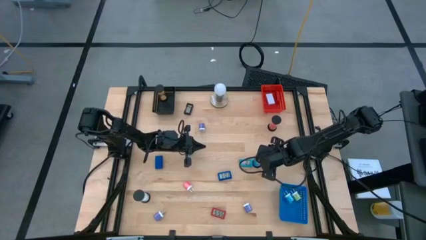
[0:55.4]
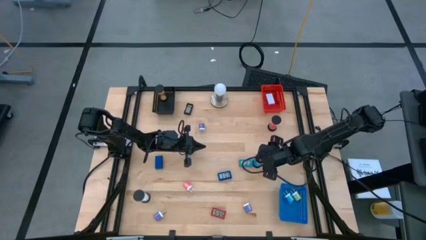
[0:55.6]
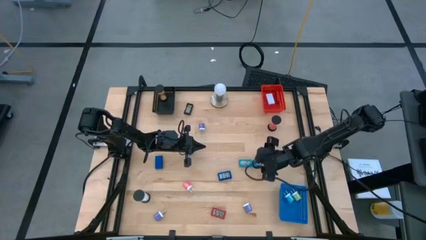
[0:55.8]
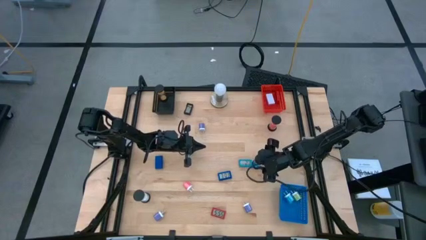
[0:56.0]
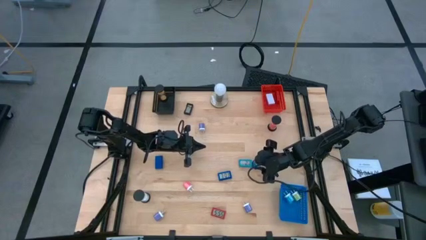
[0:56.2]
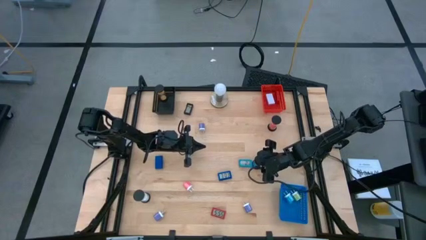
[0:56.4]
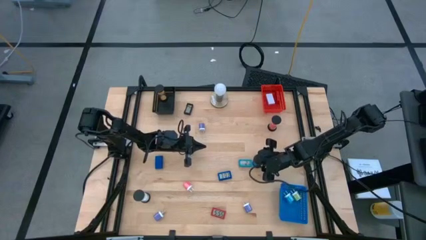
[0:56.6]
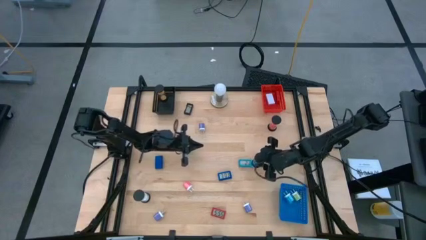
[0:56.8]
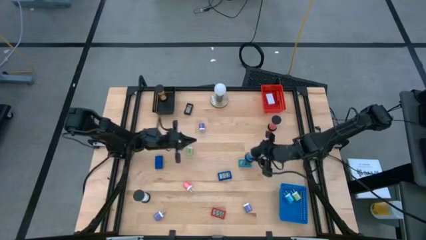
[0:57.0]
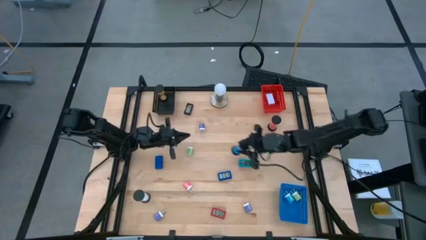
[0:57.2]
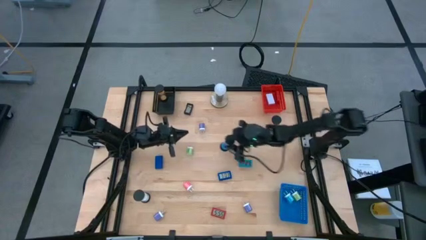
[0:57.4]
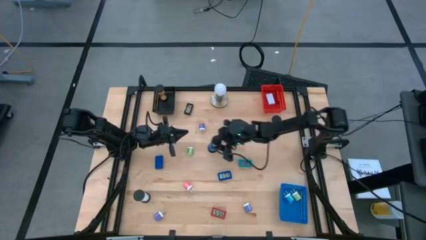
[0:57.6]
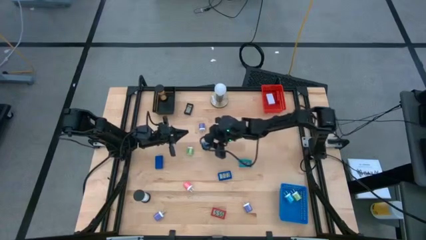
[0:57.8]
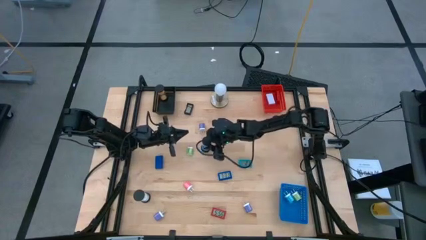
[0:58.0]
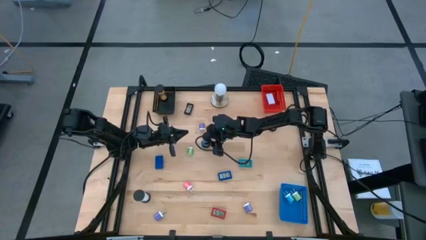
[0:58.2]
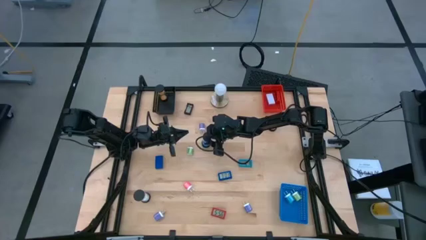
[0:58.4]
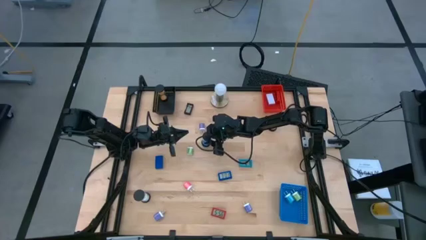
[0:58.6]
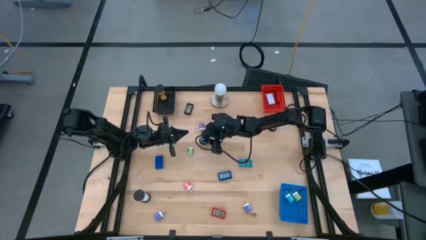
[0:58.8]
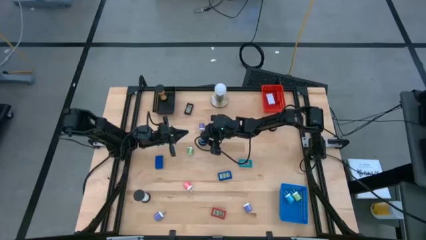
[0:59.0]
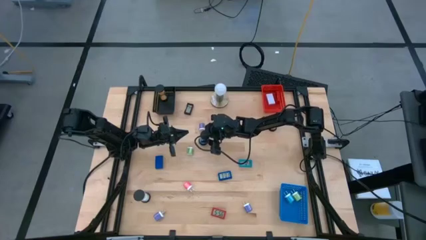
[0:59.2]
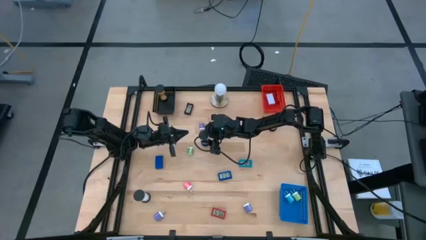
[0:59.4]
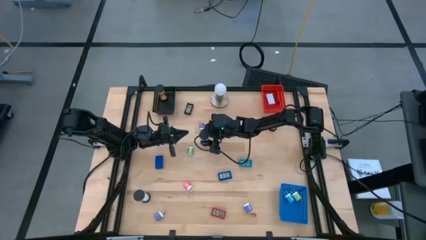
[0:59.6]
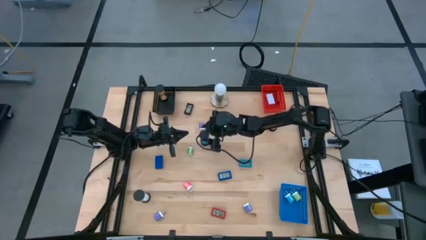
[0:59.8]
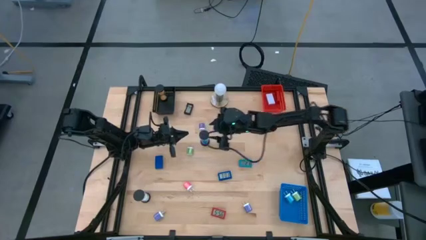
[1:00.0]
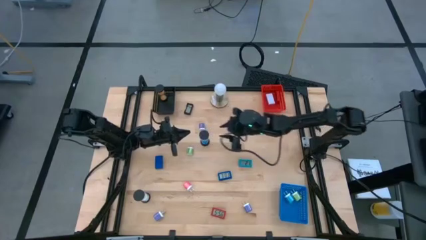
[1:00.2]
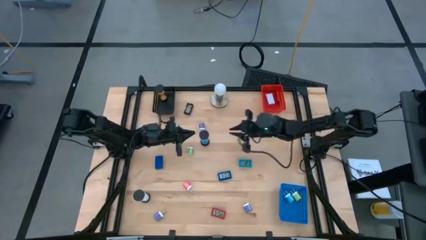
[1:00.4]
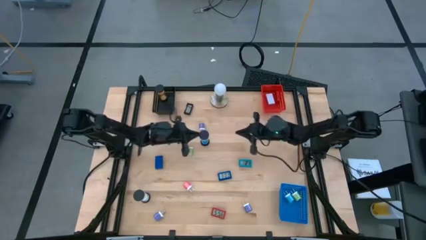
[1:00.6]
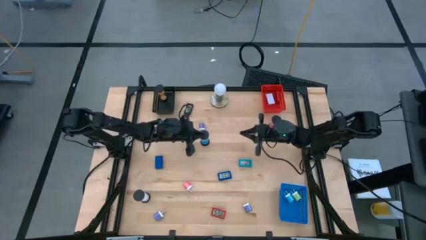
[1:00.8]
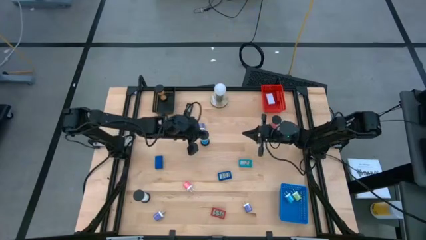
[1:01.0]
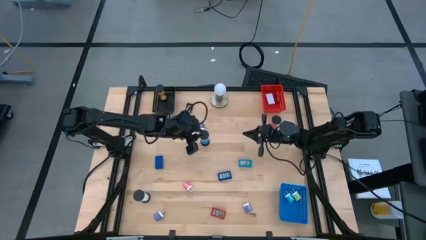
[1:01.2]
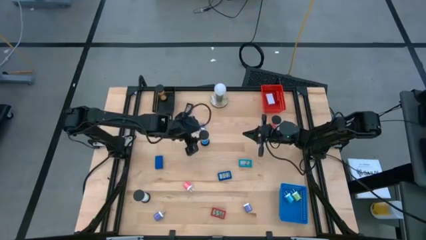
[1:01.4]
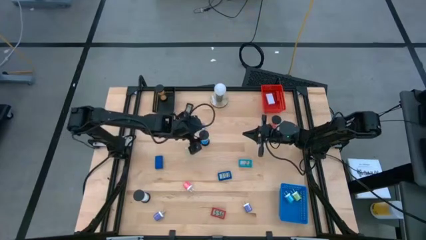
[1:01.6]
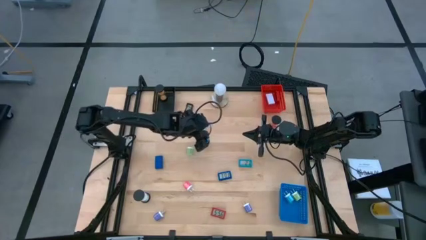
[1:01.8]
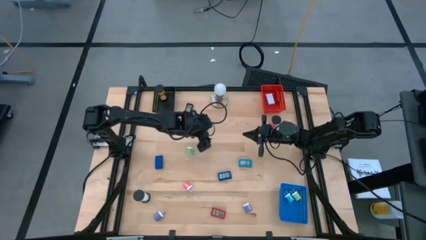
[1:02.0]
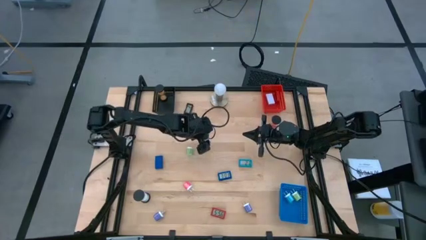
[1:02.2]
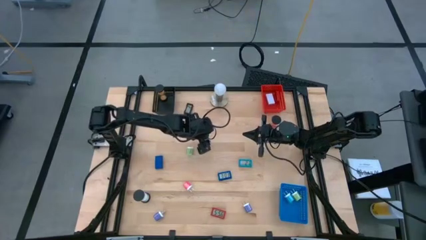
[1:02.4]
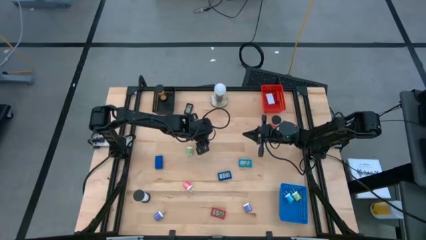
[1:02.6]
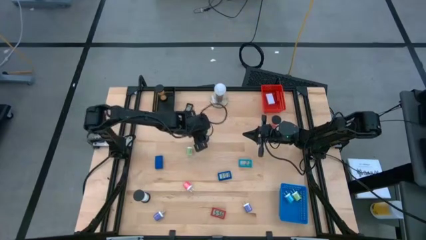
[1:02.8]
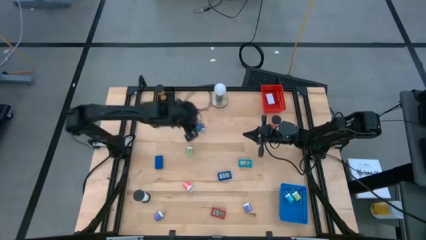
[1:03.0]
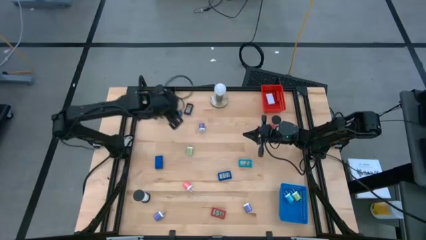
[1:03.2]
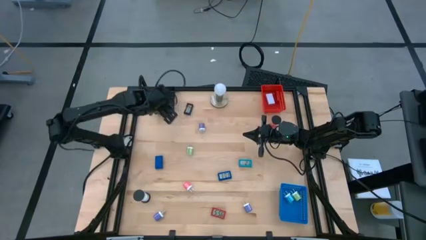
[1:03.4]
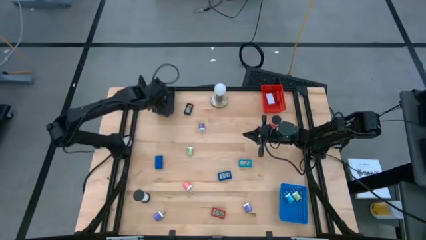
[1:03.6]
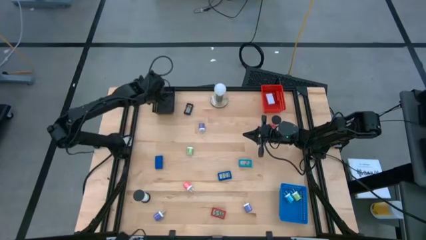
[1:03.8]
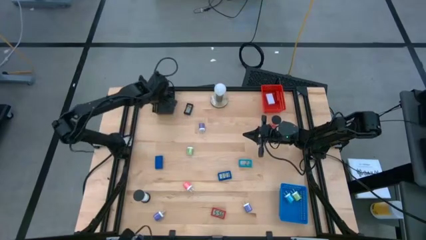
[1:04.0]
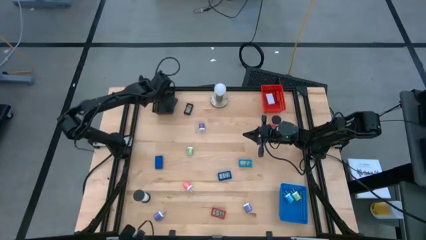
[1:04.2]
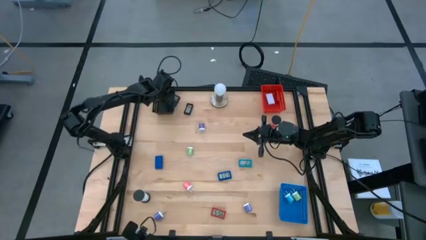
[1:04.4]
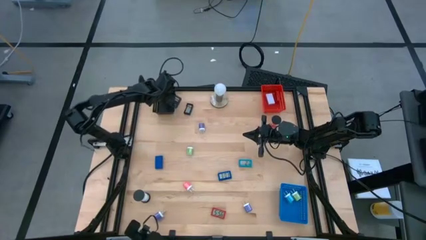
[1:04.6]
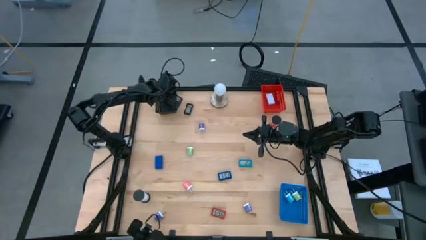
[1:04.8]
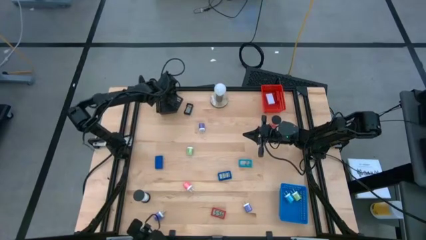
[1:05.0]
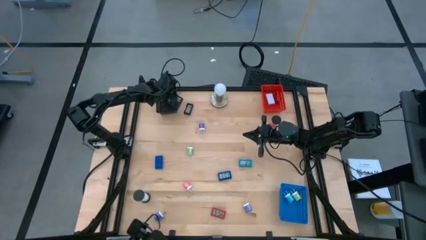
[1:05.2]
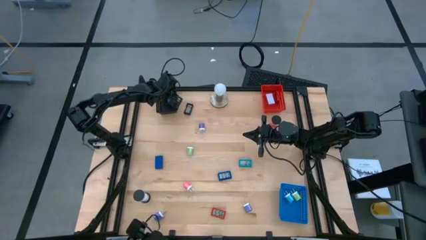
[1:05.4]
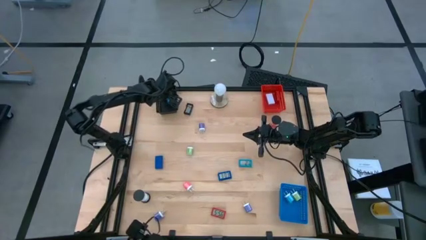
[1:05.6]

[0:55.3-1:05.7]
Task: Pick & Place Office items
Put the blue hourglass into the black bin

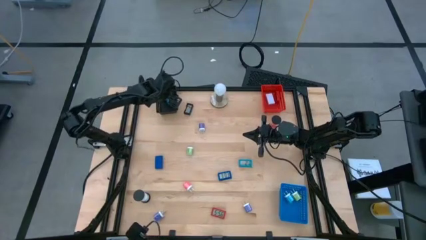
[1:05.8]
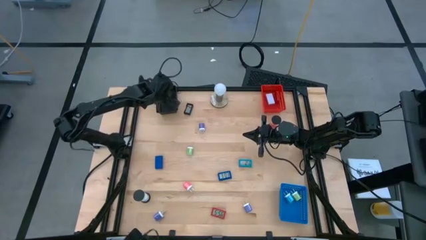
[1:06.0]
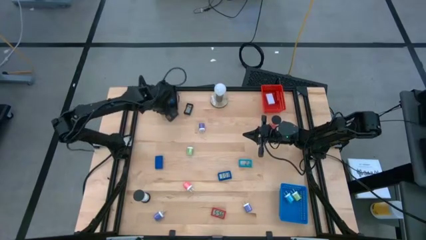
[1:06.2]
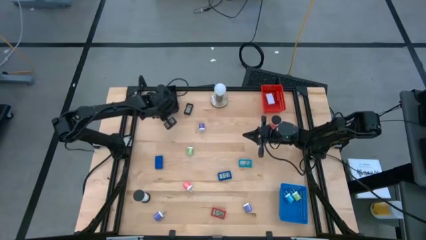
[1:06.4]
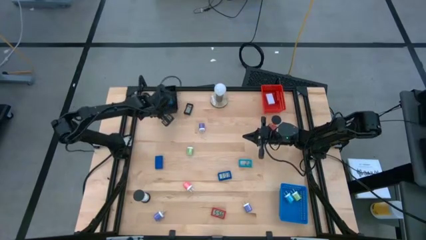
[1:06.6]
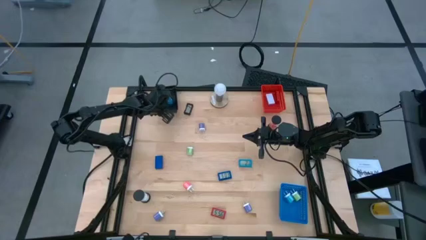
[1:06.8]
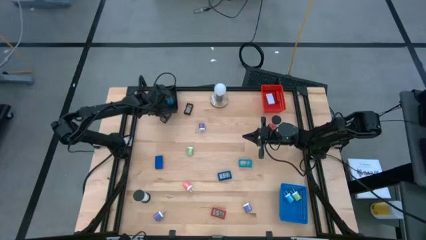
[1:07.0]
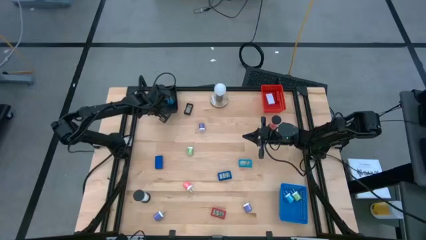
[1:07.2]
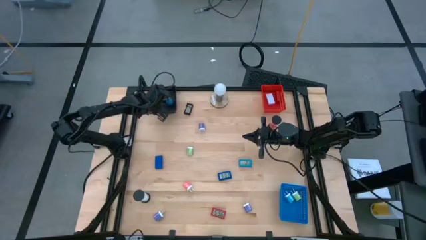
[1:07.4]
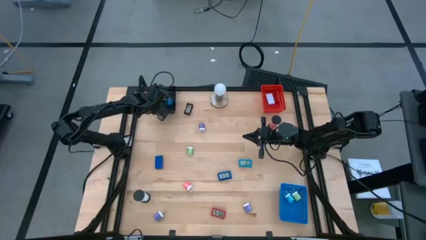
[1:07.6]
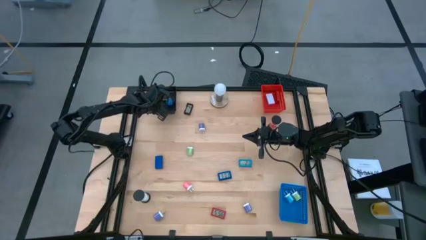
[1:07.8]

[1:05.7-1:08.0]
Adjust the black bin
